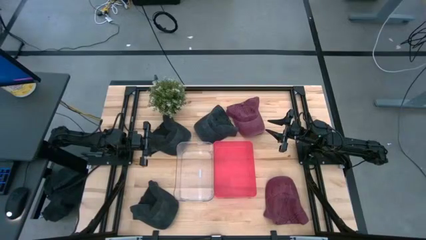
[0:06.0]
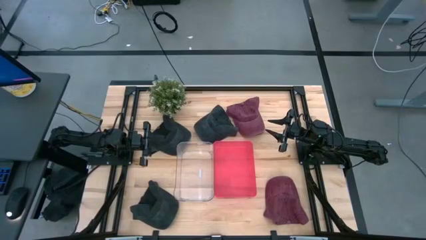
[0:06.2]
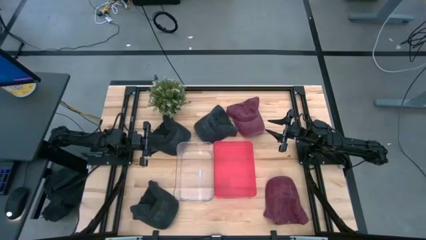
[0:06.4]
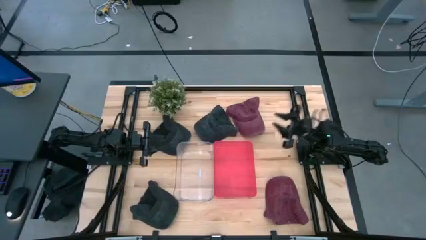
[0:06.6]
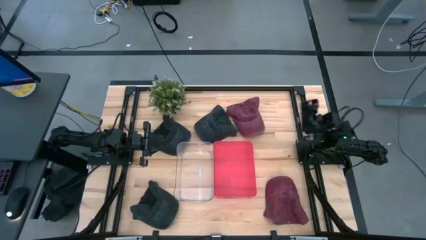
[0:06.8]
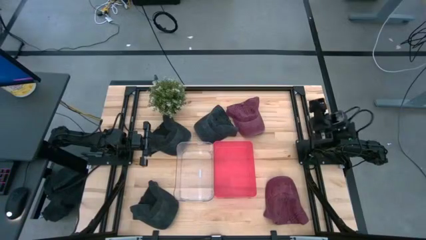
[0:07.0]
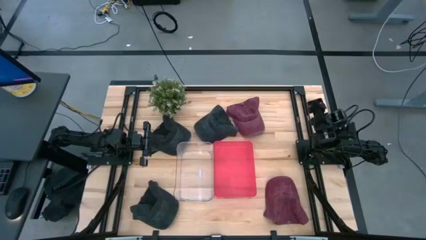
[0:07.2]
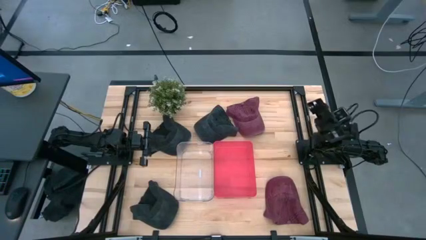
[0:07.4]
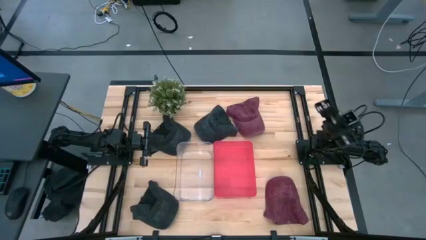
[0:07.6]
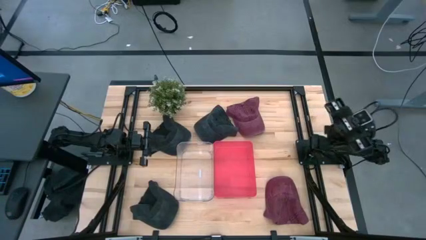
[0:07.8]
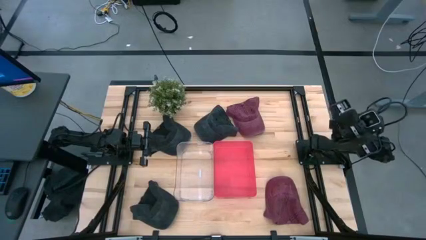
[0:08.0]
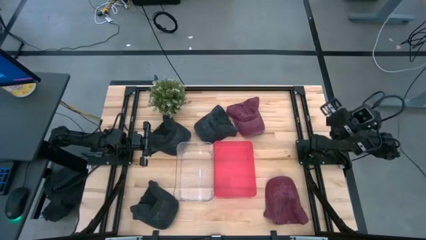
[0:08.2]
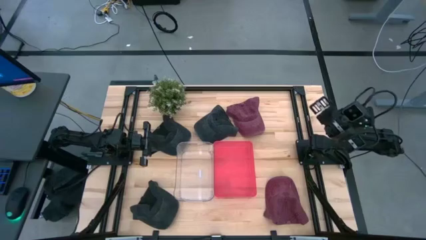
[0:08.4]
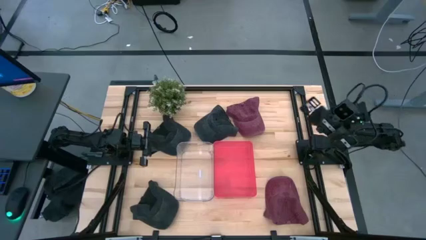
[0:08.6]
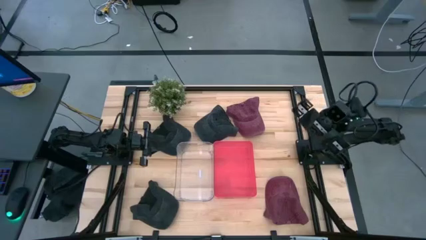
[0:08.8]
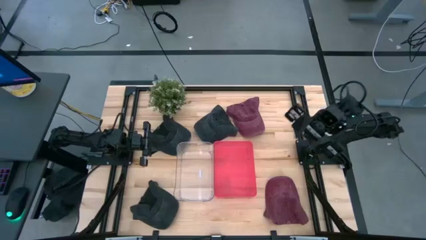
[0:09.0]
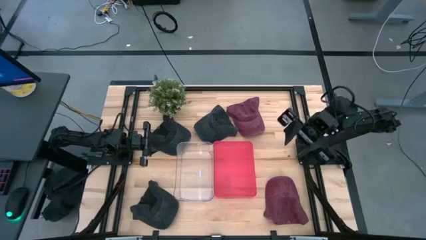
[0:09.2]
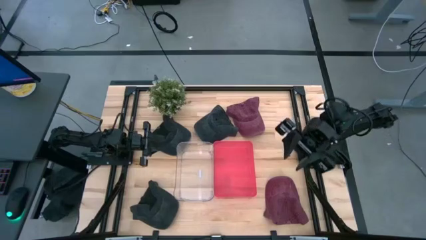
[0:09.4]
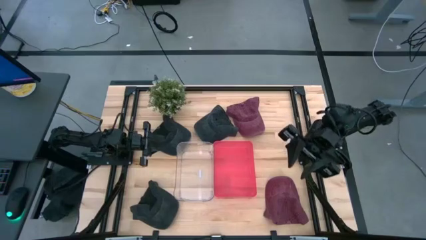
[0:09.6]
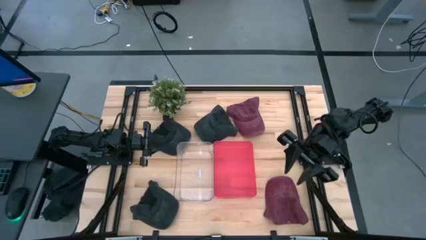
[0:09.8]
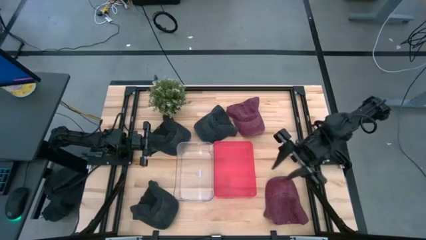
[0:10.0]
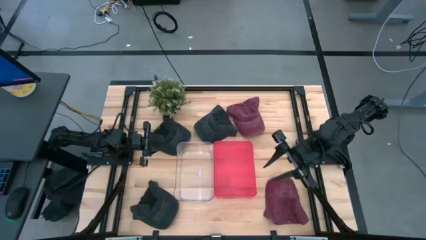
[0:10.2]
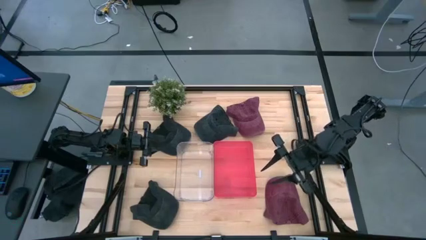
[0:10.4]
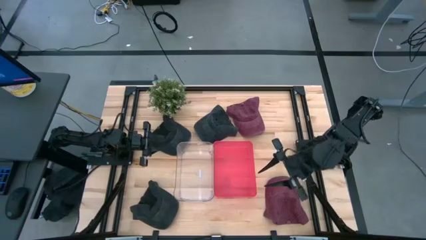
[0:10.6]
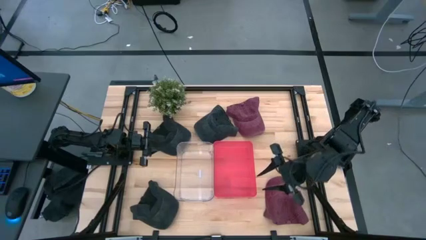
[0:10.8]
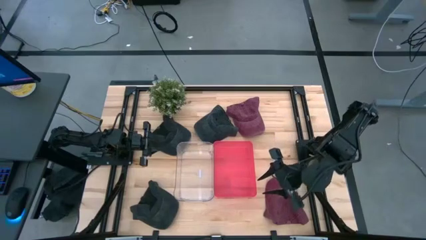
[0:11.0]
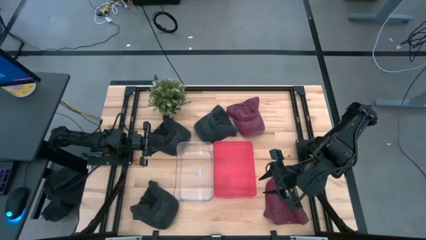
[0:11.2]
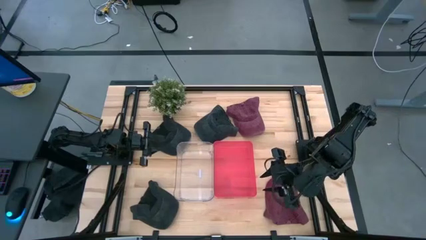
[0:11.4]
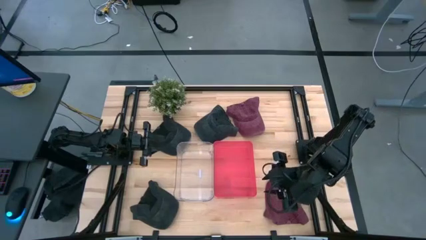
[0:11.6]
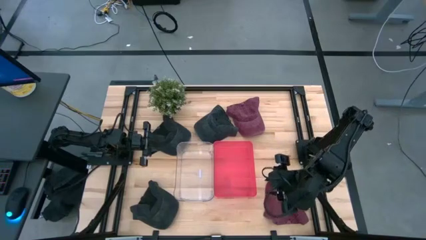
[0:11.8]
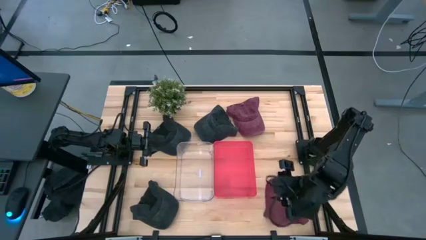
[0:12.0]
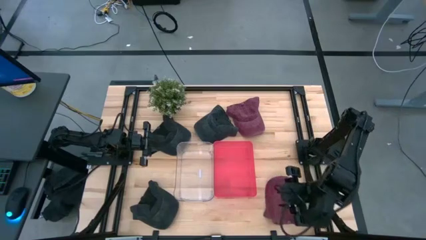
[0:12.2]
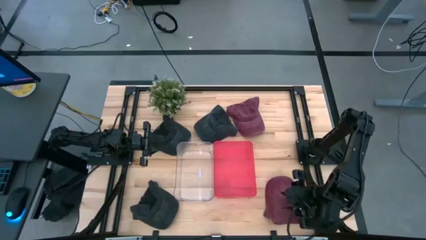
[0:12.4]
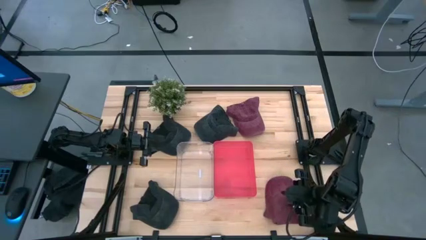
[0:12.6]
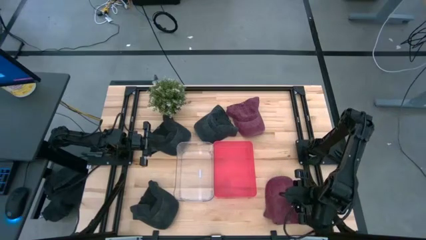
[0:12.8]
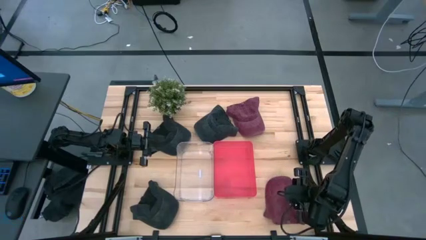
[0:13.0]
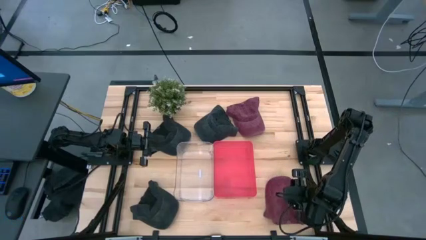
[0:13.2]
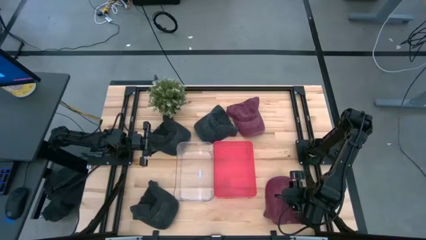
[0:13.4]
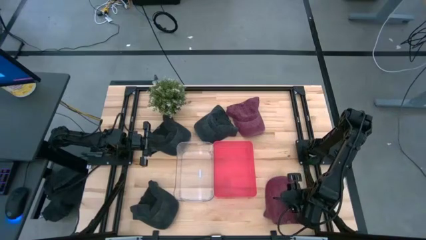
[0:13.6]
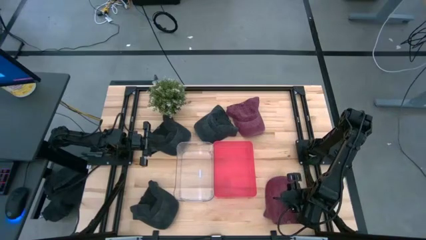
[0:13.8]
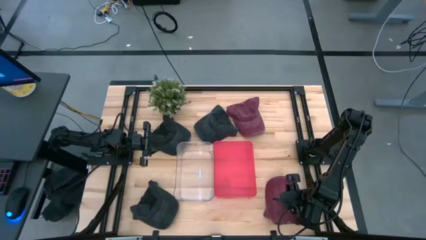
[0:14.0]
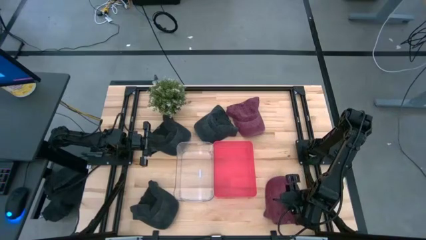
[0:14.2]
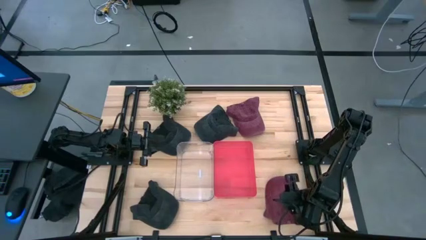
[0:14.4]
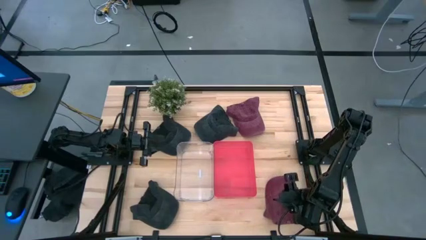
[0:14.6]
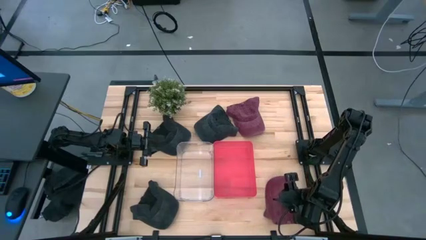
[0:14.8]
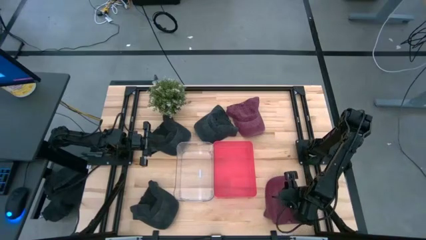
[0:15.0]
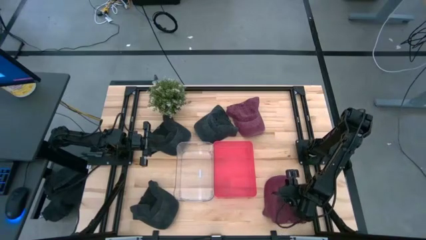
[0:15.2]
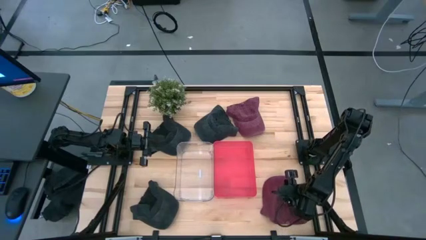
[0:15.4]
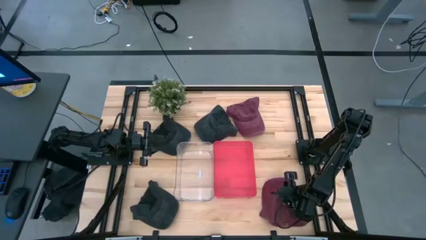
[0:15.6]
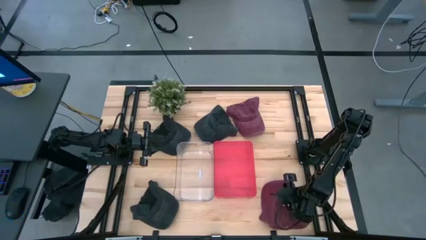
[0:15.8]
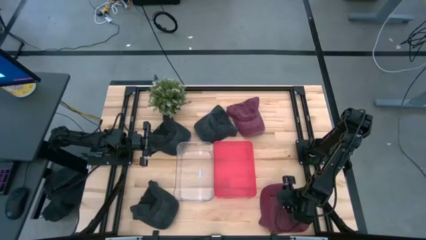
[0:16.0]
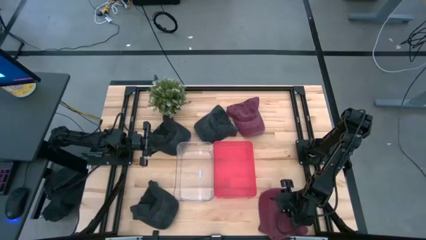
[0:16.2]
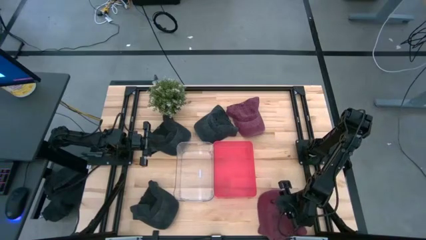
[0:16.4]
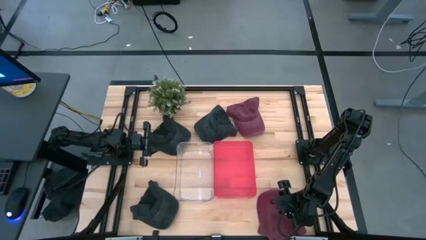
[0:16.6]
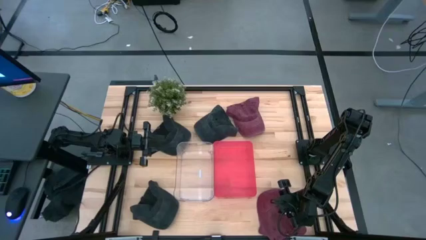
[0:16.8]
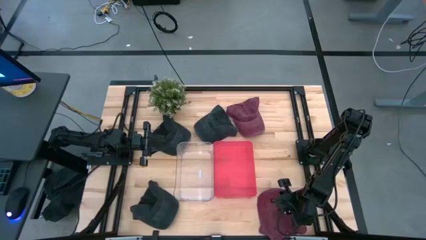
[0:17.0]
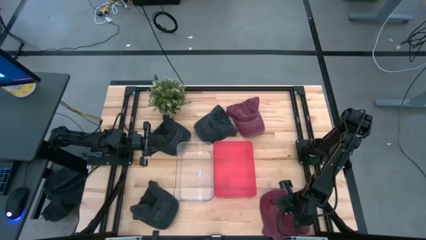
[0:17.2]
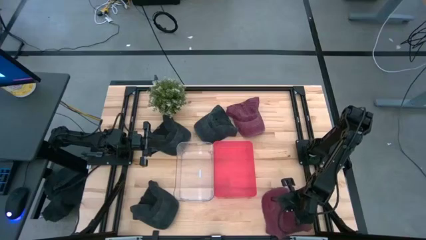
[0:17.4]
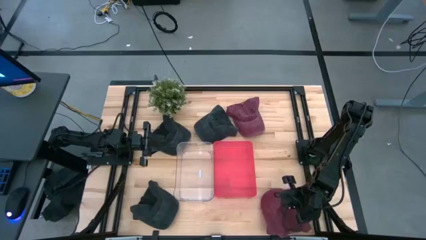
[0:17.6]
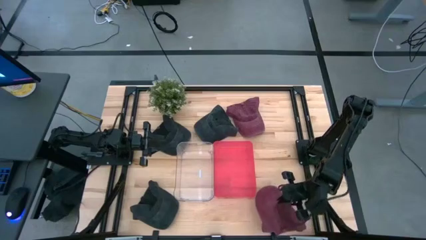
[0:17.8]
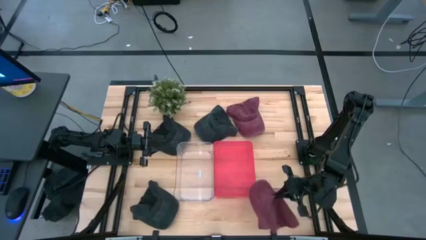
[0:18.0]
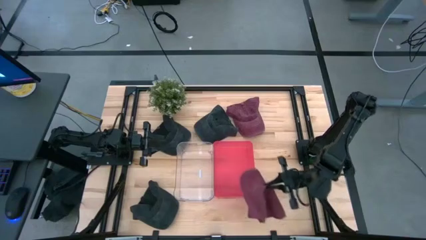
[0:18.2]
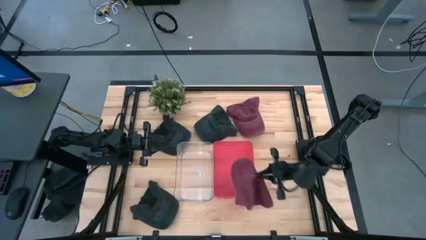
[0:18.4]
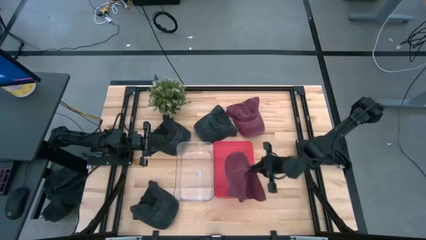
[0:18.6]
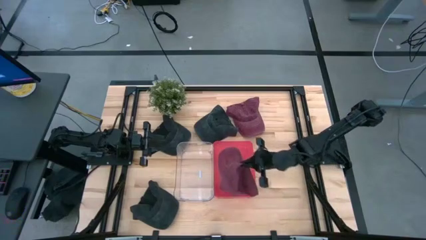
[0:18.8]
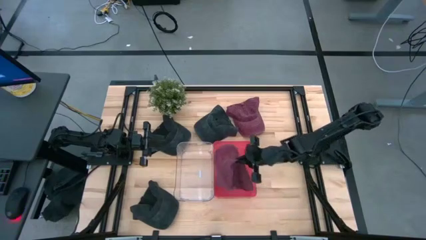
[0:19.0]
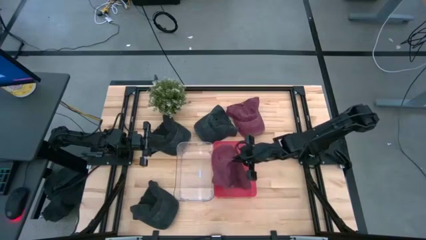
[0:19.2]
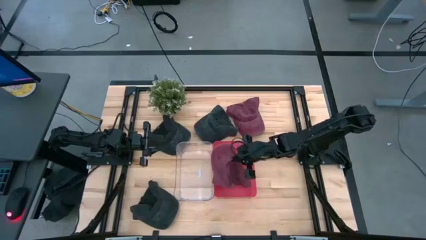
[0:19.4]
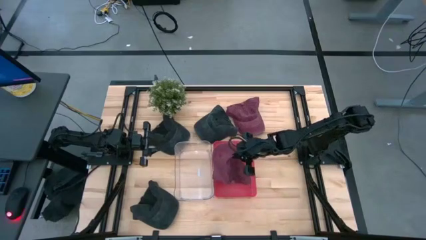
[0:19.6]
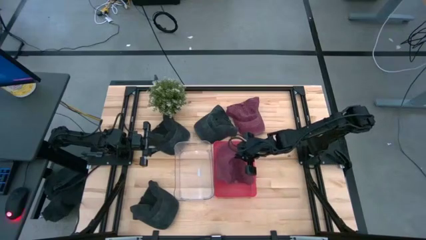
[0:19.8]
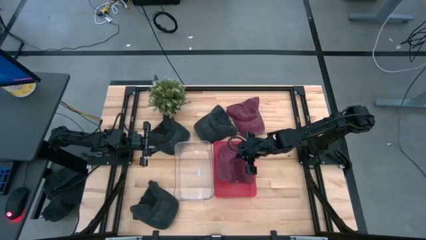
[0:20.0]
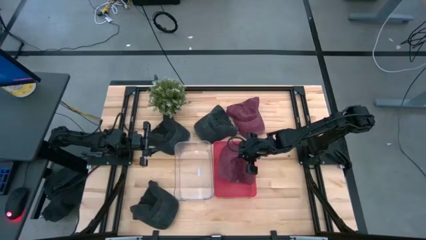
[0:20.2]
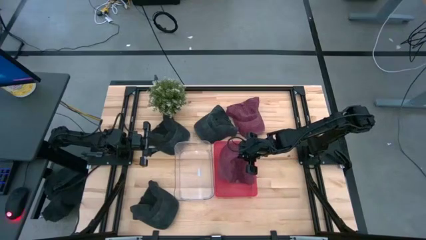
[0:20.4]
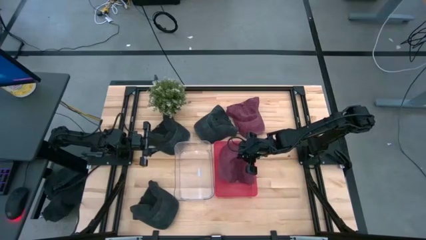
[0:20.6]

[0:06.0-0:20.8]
Task: Pick & Place hat
Put the bottom red cap into the red bin
